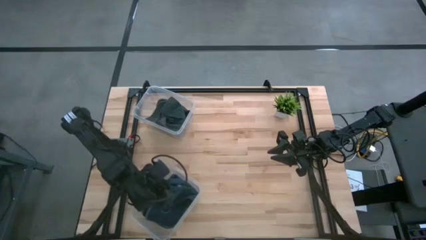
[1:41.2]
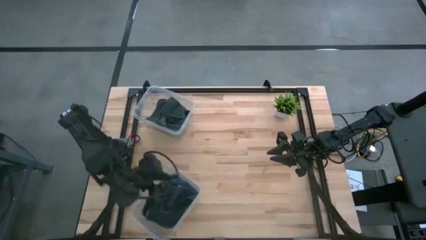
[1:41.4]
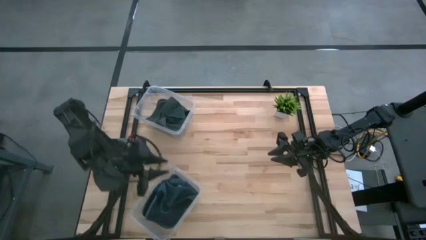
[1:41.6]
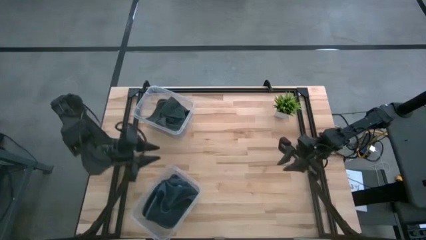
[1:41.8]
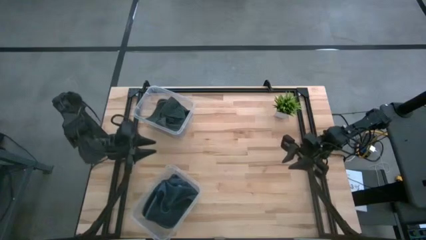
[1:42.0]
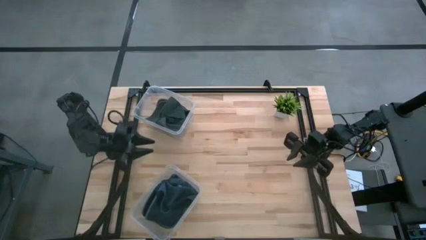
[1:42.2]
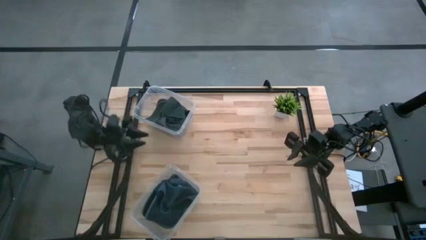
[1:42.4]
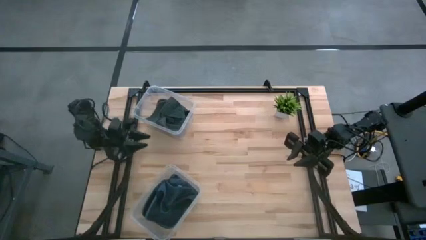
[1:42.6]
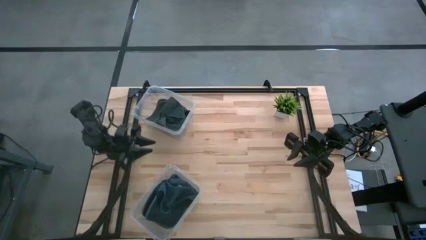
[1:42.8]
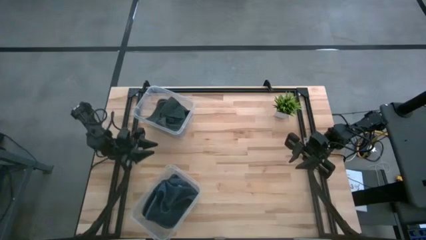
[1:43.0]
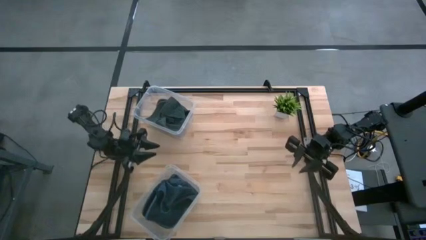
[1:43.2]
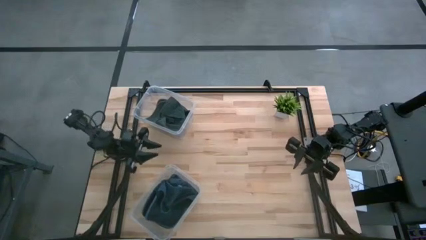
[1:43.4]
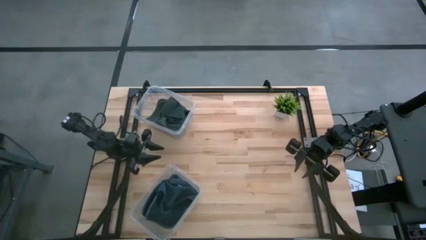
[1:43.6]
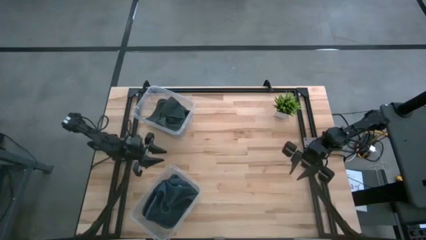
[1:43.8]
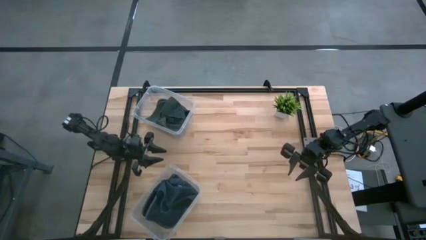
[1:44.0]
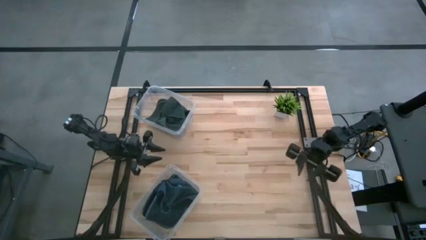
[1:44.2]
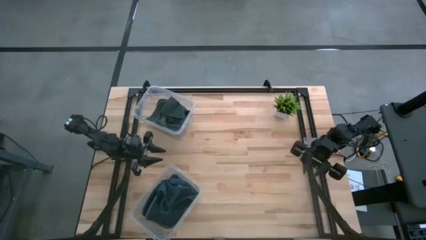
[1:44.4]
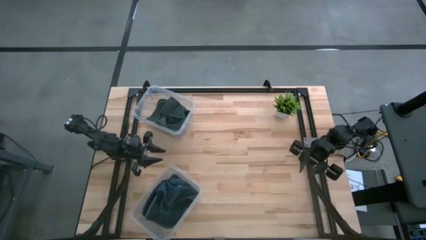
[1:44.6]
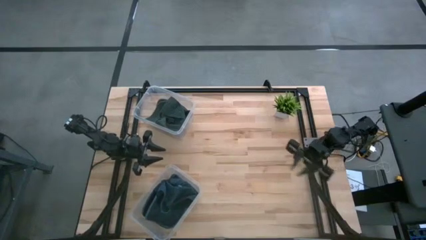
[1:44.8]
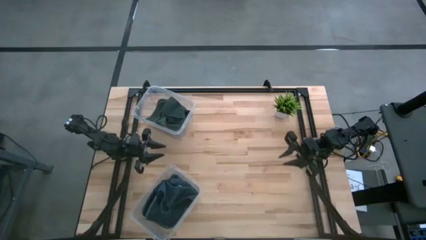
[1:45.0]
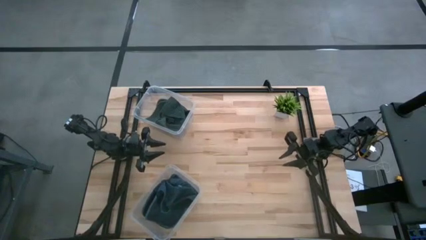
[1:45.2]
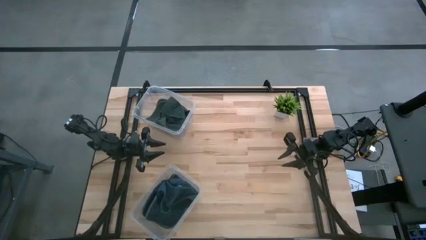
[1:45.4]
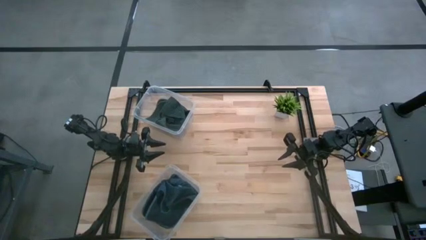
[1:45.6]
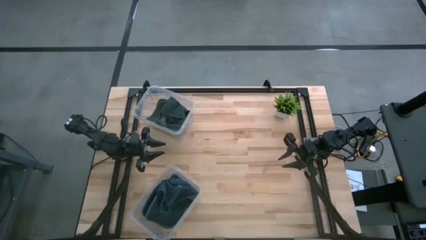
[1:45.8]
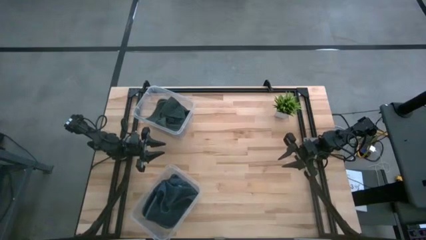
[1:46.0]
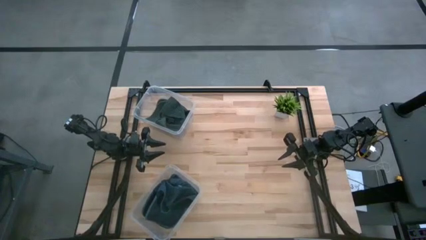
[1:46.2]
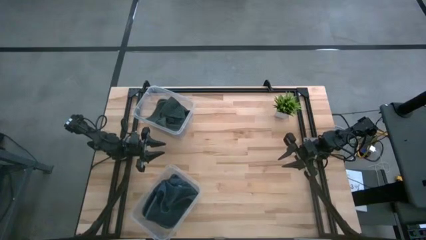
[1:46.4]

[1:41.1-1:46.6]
Task: Pick & Place hat
Return to Home Position

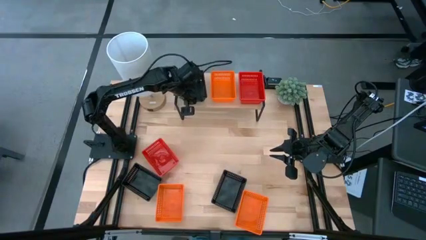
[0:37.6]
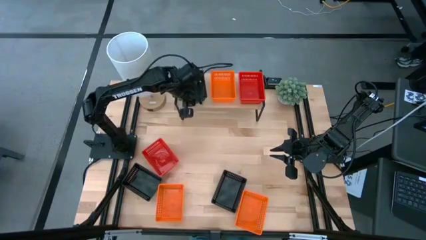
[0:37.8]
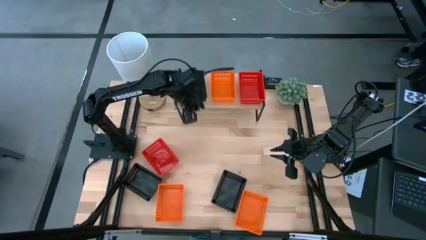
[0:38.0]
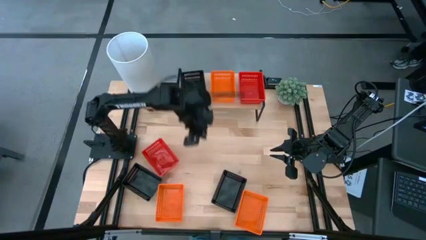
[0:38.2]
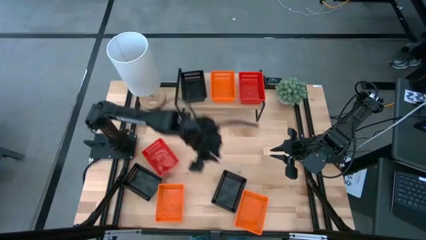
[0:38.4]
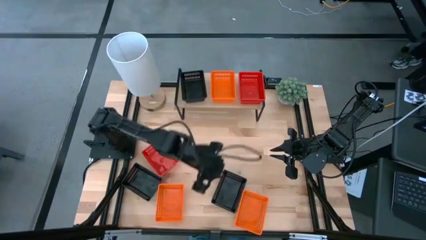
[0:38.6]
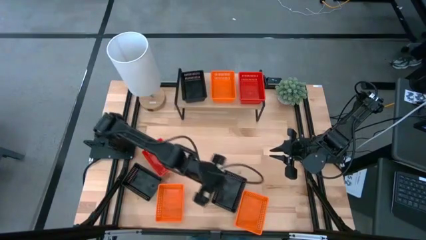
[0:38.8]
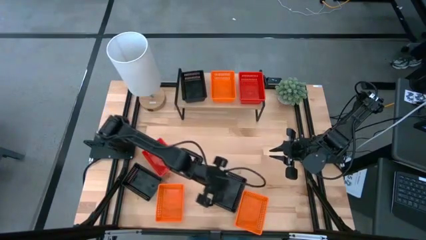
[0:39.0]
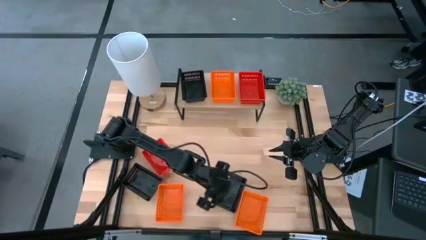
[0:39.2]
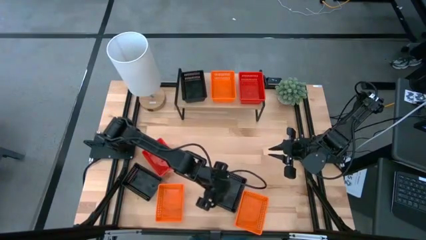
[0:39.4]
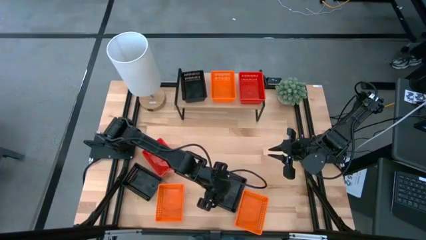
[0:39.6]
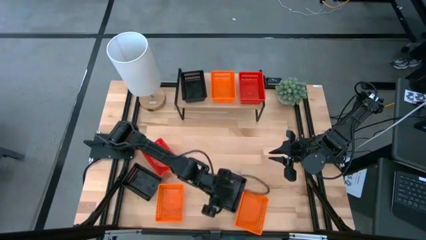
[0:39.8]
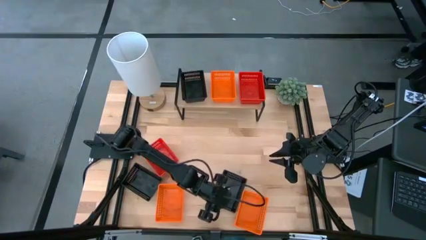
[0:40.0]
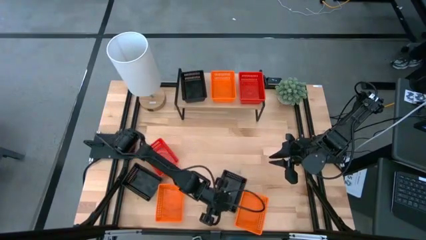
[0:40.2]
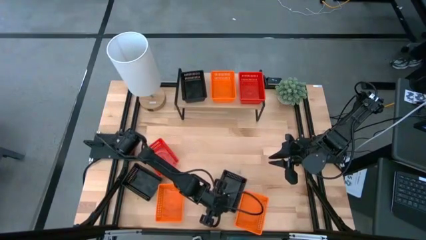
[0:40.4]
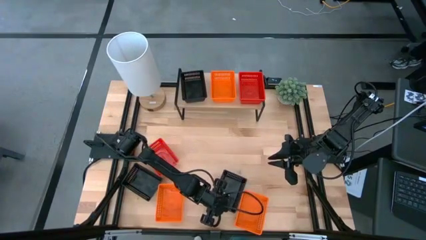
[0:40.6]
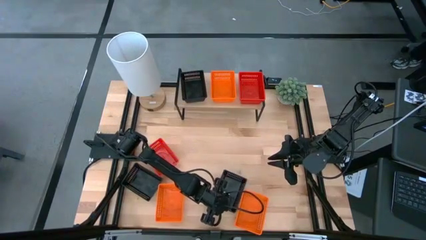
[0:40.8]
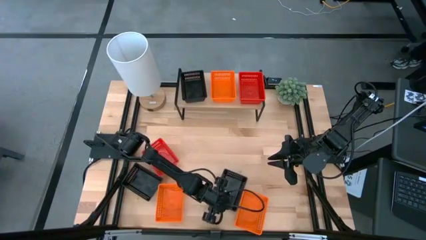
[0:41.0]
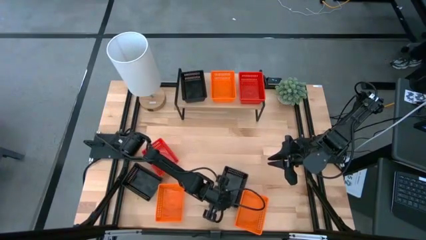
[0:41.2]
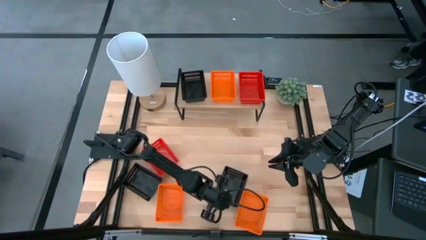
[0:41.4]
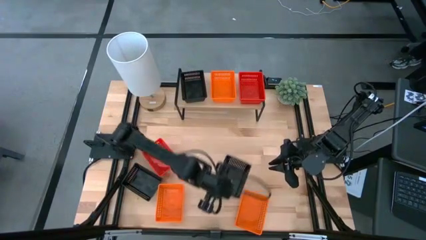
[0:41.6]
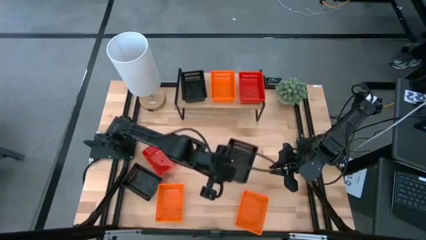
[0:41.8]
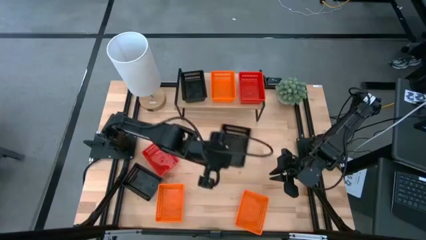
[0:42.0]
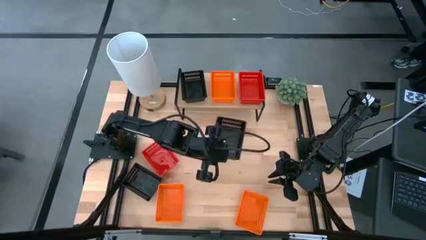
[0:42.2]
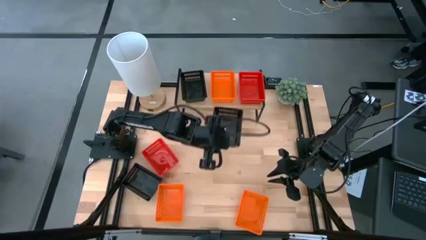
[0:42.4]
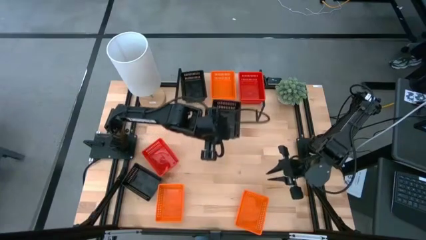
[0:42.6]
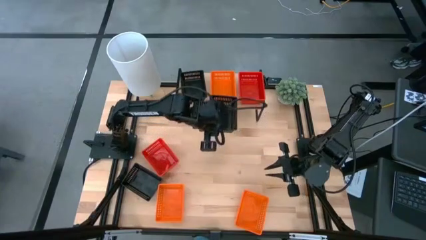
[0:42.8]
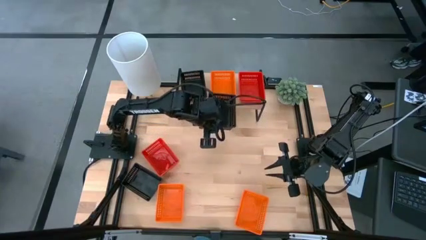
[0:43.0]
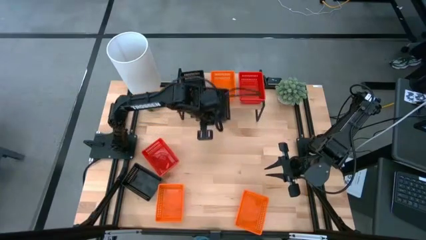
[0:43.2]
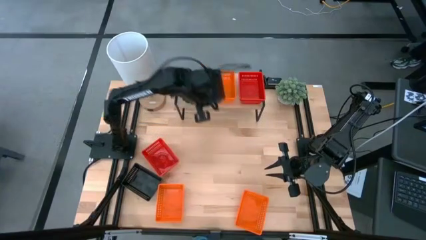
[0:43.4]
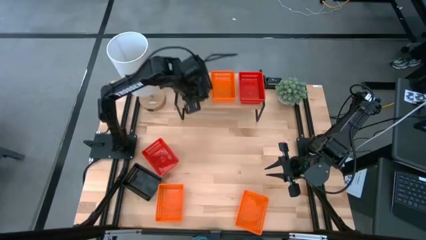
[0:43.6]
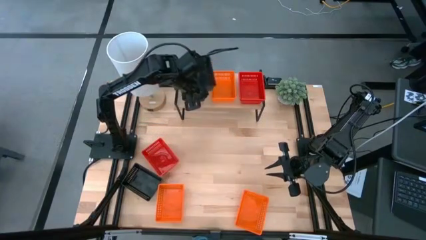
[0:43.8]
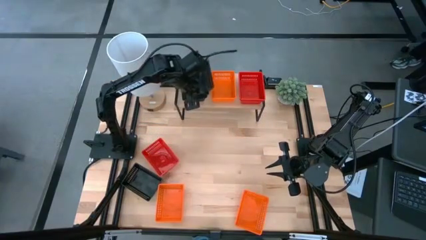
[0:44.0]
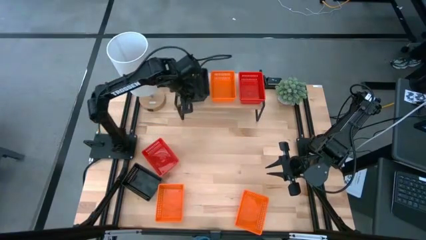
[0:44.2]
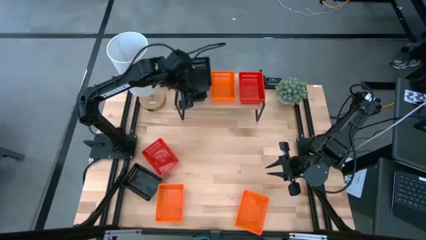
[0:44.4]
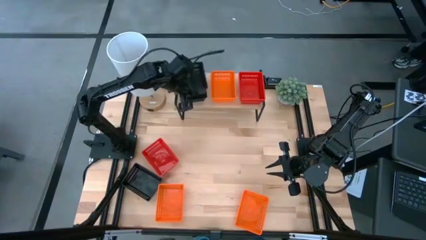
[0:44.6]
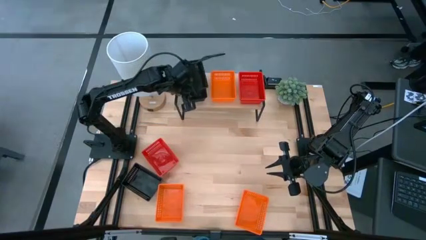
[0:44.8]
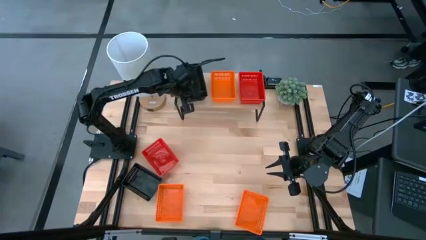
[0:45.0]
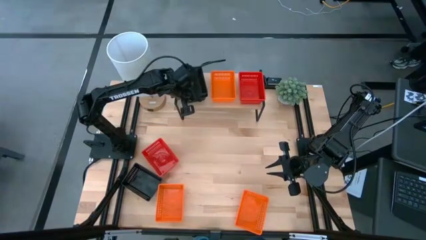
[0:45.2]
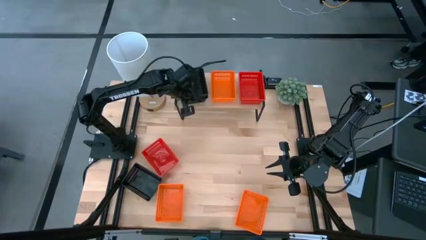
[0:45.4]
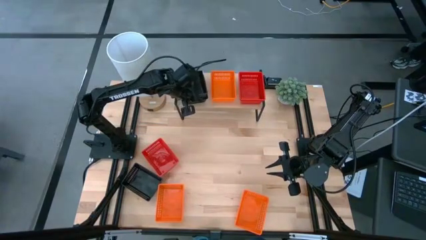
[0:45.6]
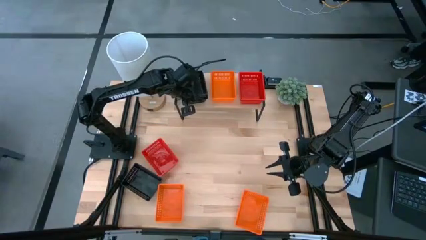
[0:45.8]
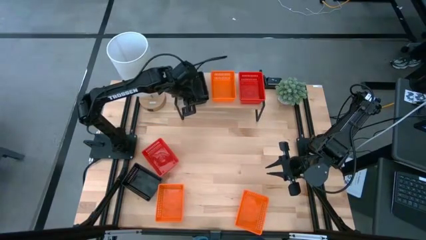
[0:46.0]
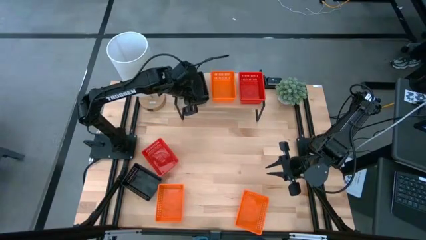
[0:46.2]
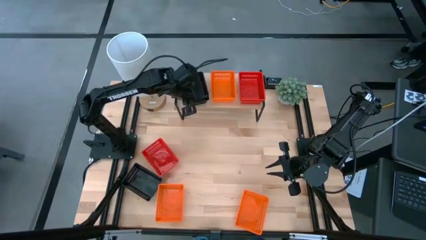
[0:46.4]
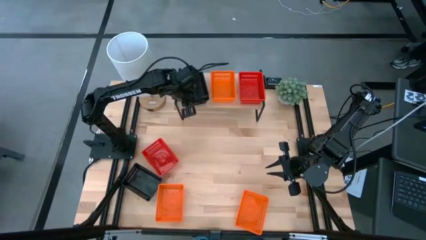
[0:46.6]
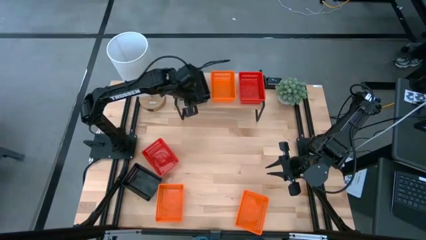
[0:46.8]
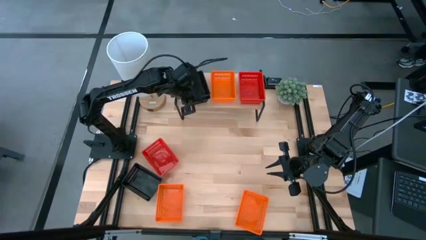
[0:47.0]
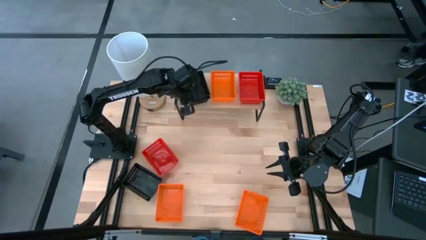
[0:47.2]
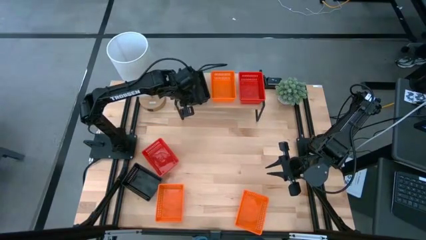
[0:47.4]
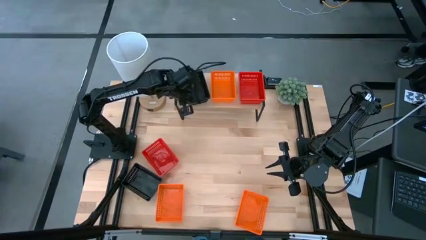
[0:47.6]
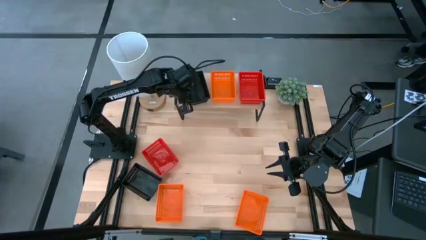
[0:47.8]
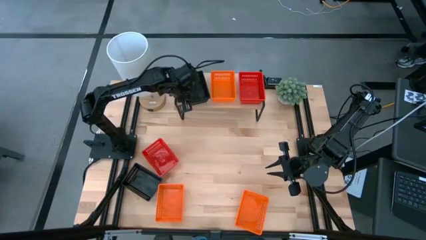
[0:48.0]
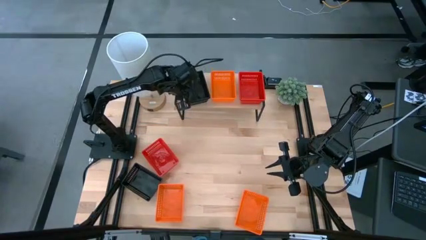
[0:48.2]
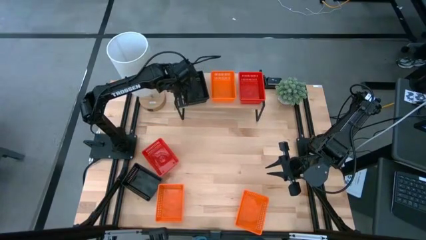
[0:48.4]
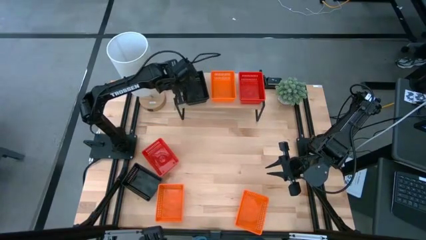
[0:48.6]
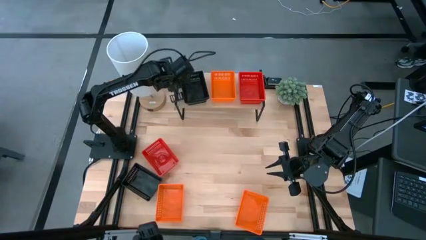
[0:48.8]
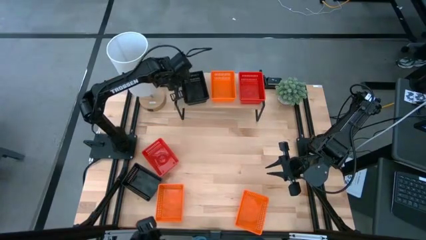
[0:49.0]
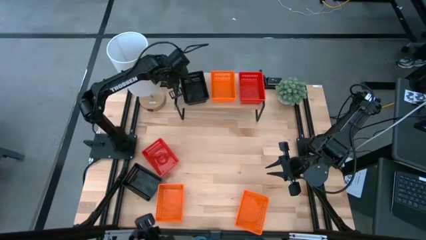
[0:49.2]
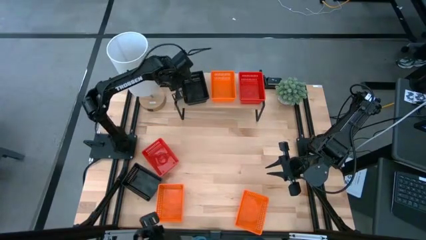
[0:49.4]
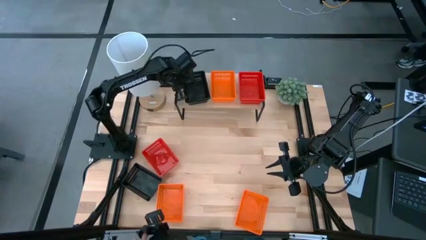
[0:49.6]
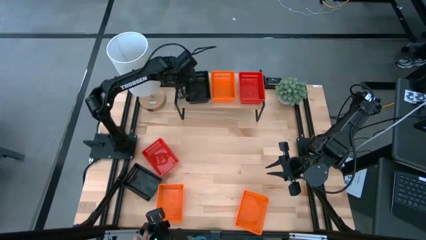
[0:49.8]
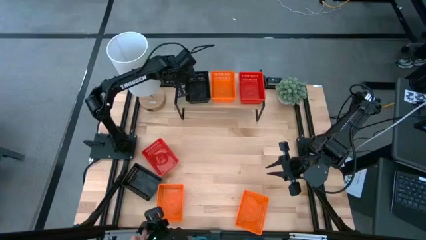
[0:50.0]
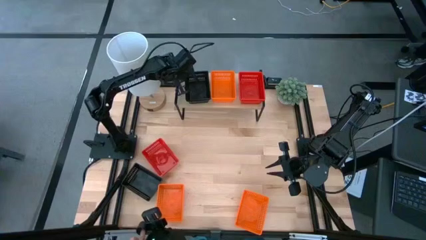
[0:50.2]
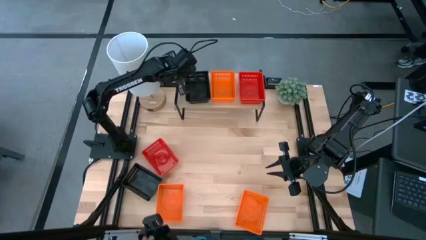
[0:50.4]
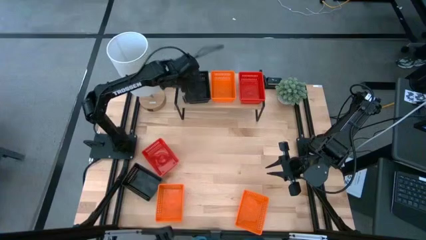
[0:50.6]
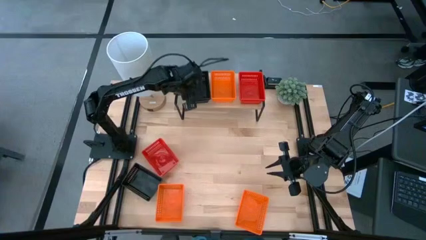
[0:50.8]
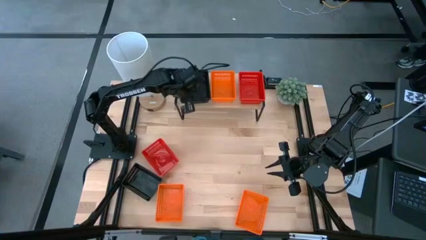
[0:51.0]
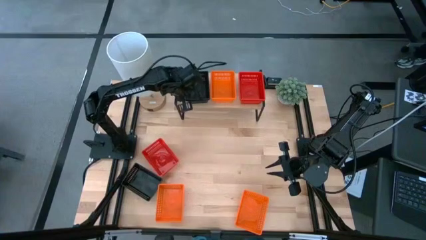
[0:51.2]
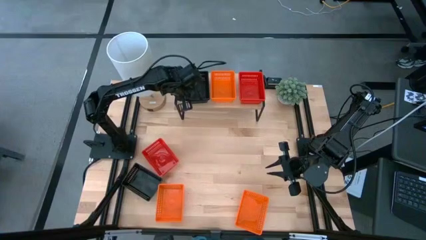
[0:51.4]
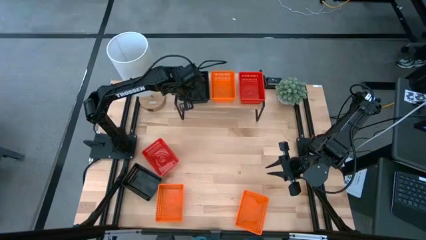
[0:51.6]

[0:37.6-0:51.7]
Task: Stack baskets on shelf by color
Stack the right black basket on top of the black basket on the shelf
